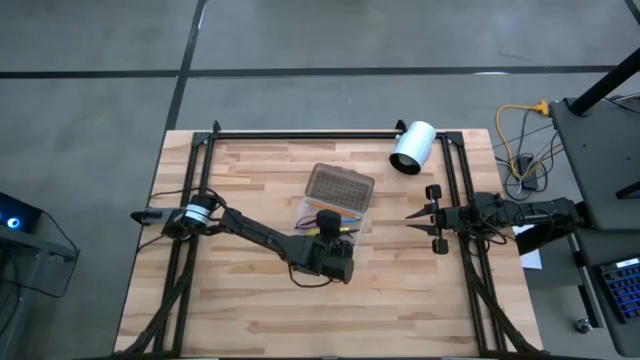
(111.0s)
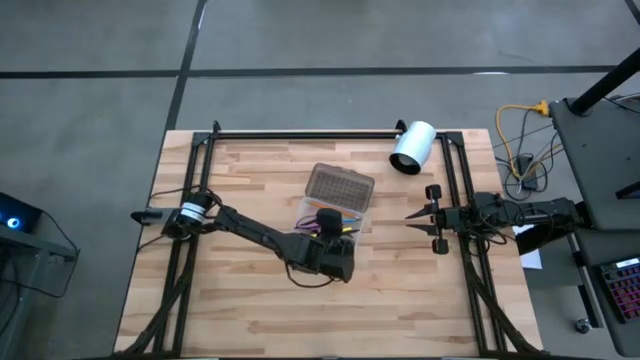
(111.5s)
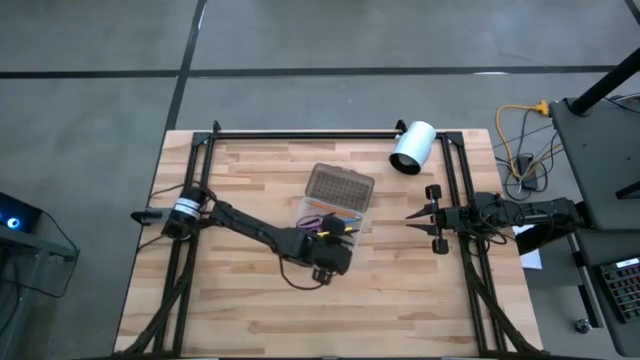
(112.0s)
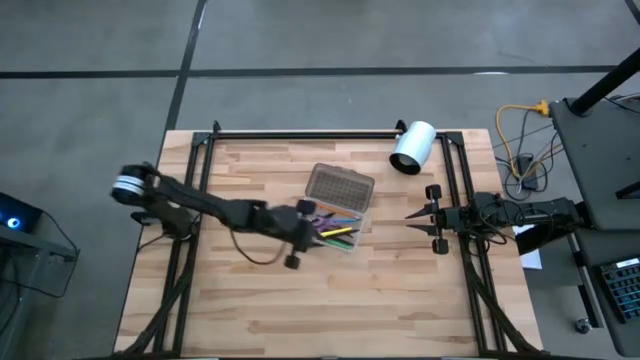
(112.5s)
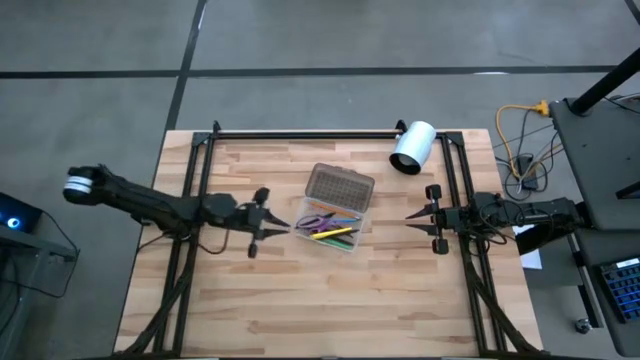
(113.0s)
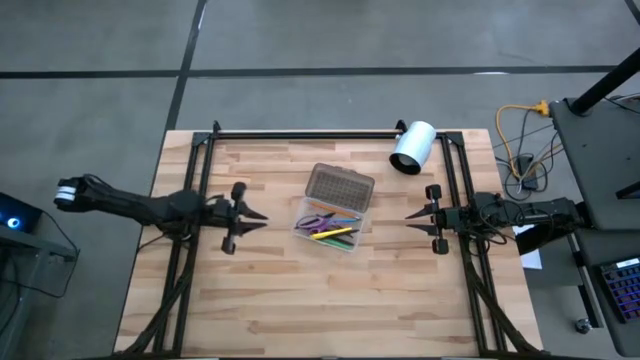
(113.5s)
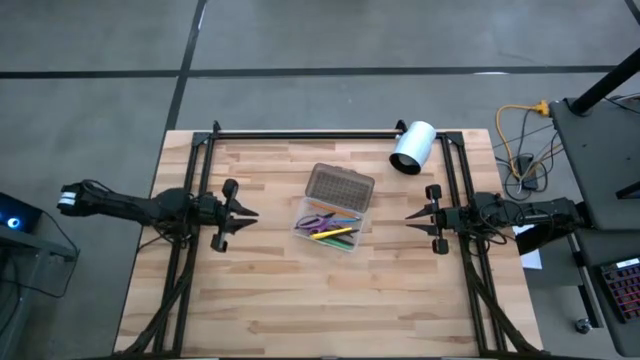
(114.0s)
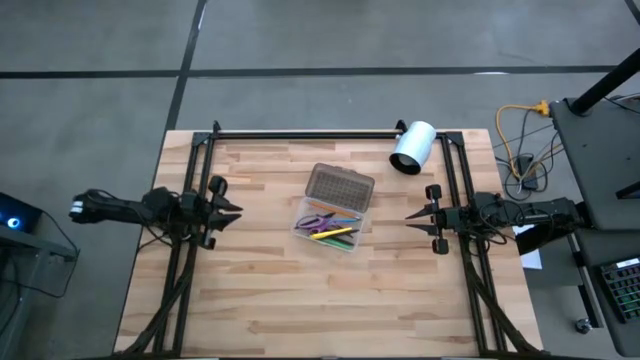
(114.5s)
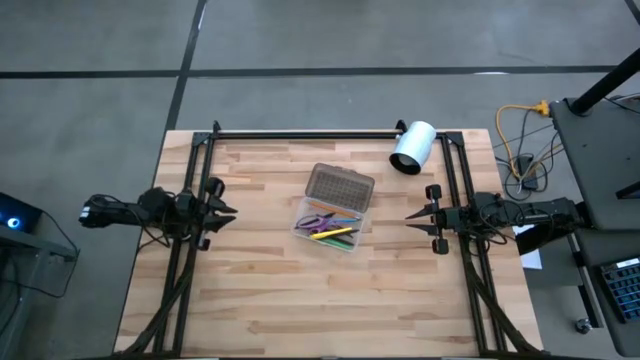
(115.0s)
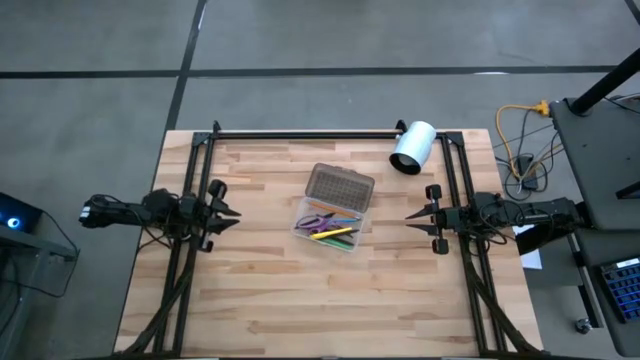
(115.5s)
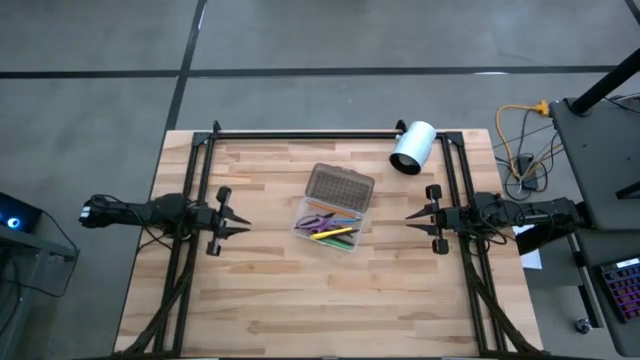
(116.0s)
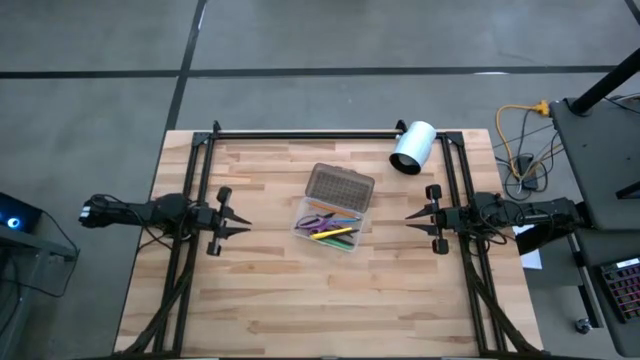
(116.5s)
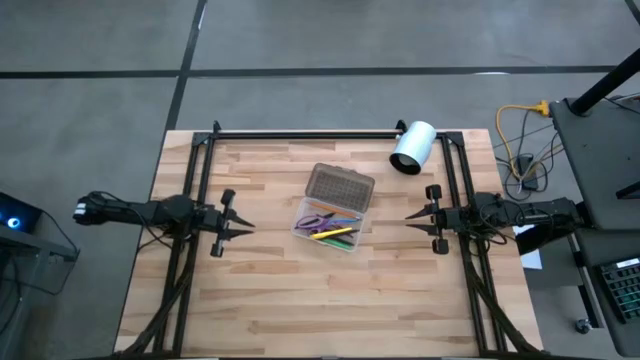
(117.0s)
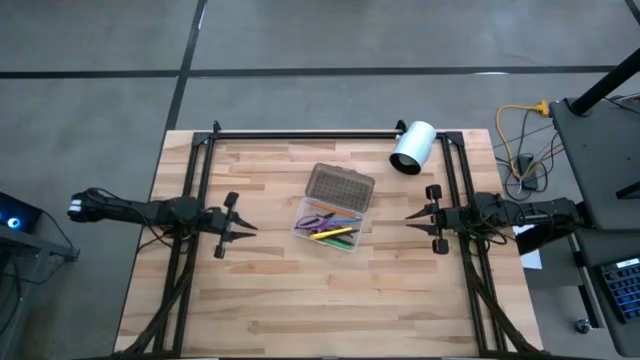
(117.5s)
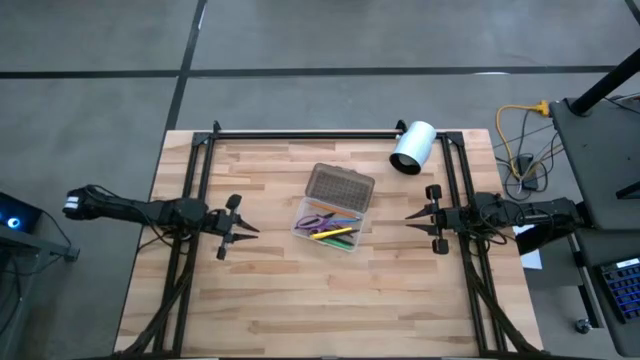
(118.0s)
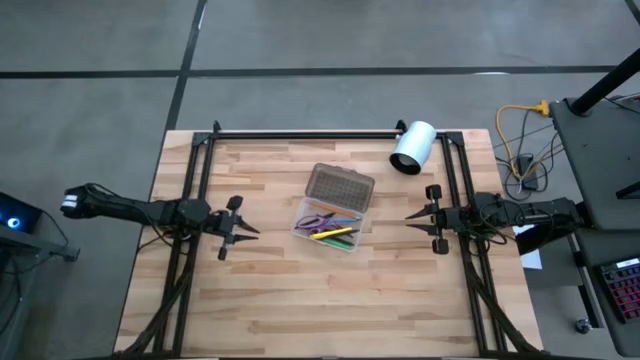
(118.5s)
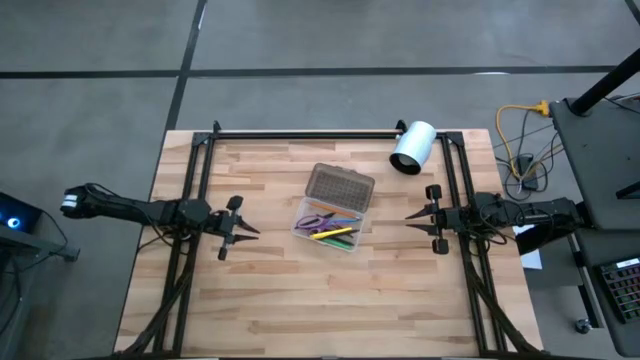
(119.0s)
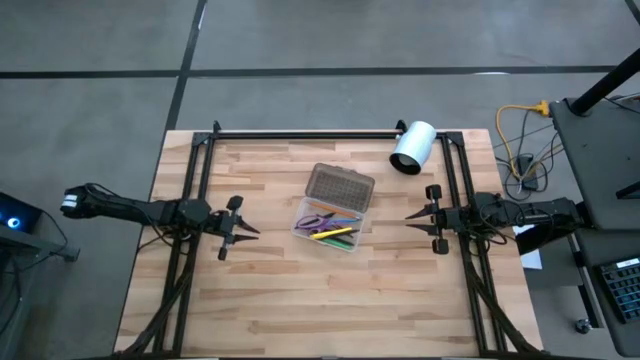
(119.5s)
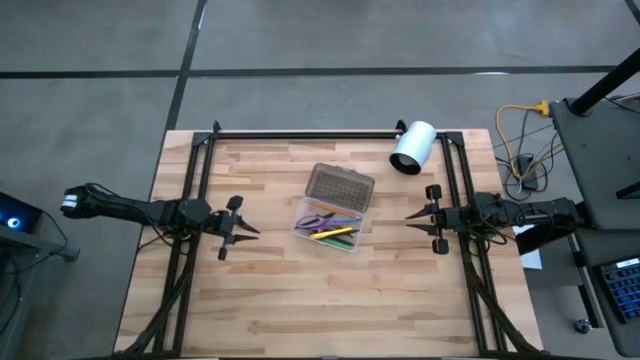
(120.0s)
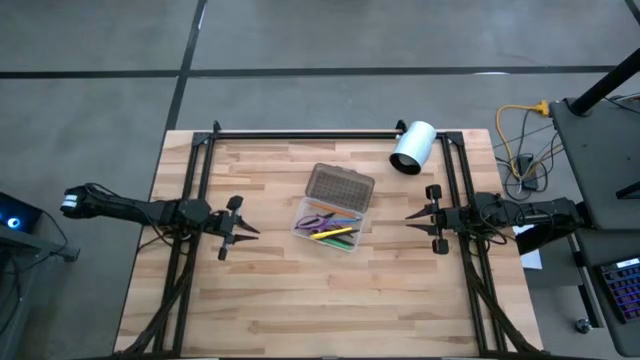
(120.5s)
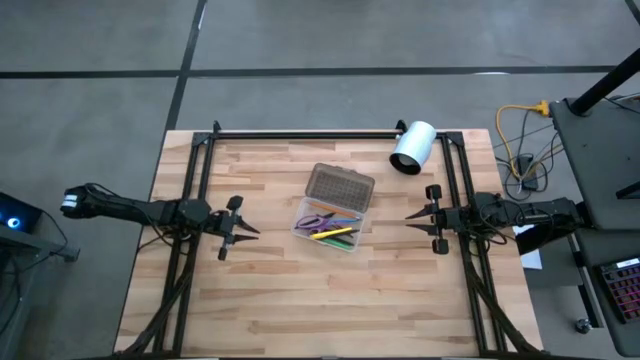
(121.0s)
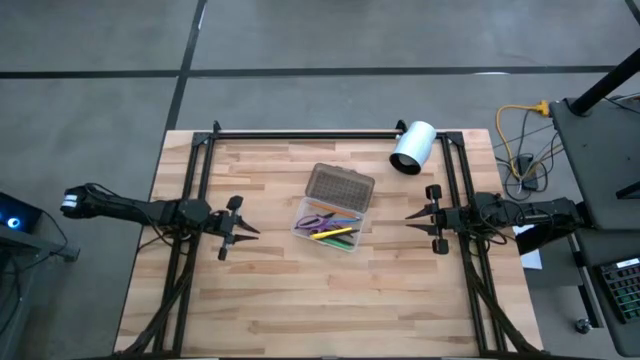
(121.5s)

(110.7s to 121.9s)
Task: Pick & place school supplies into a supply box
Return to Home Position

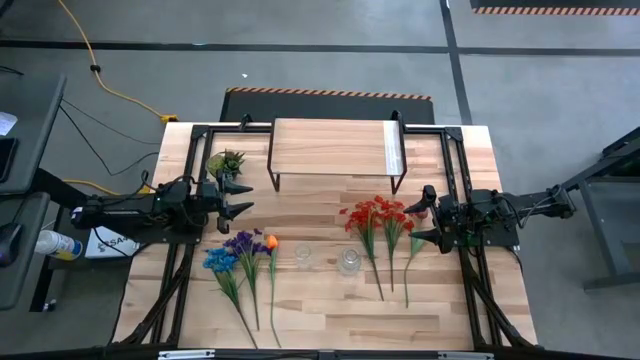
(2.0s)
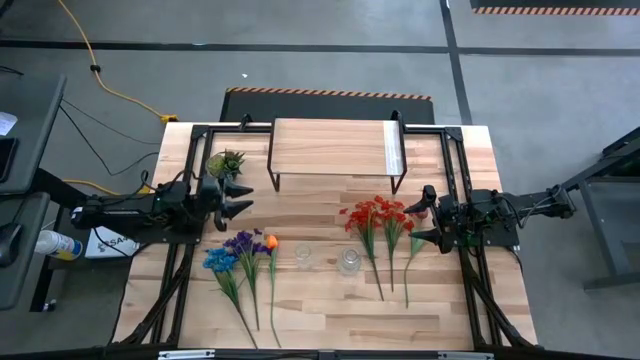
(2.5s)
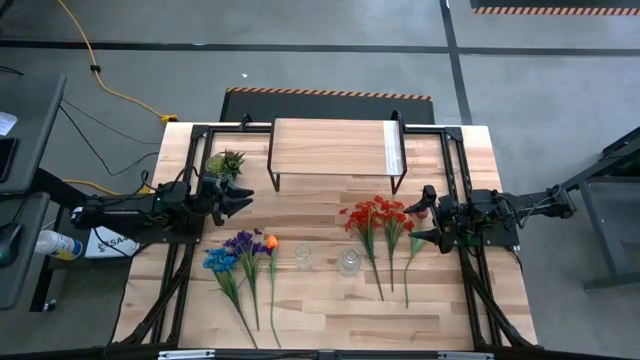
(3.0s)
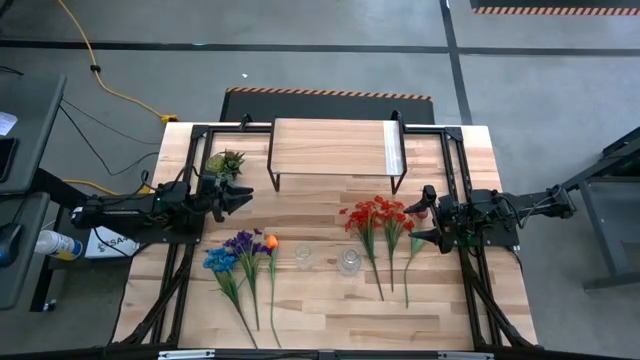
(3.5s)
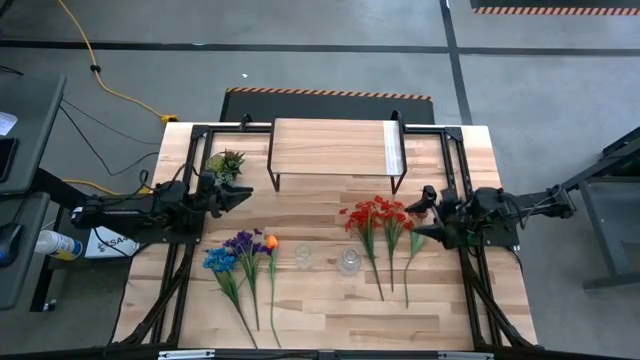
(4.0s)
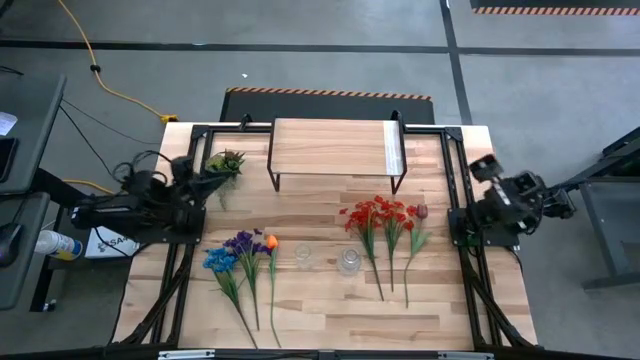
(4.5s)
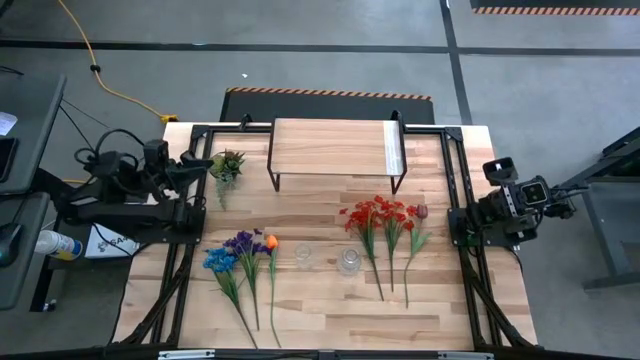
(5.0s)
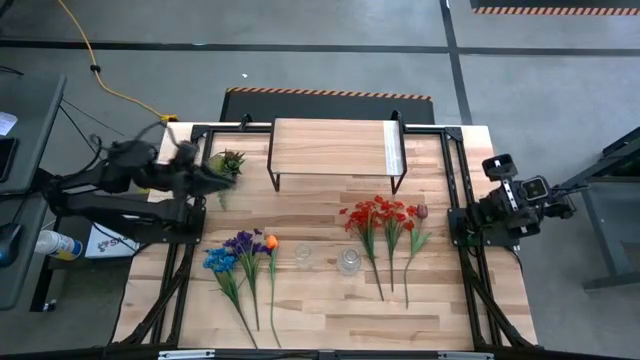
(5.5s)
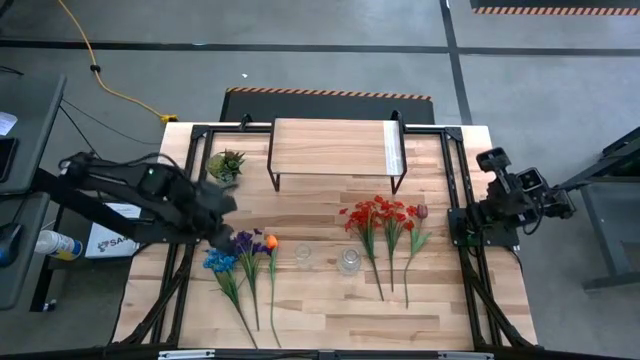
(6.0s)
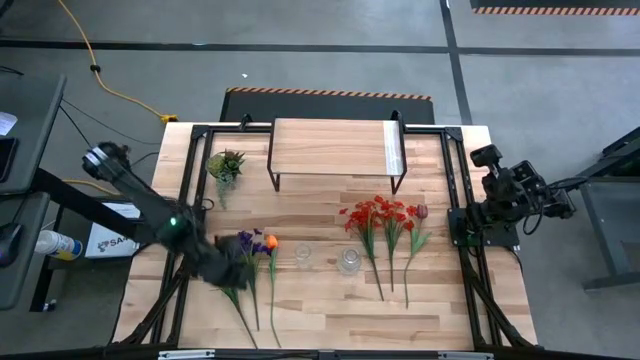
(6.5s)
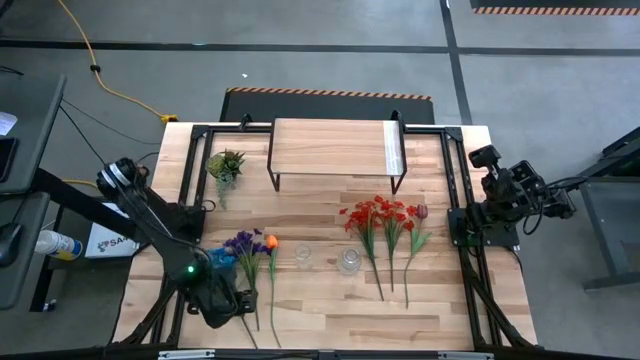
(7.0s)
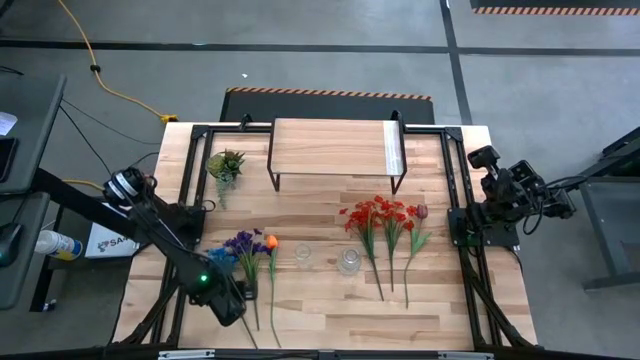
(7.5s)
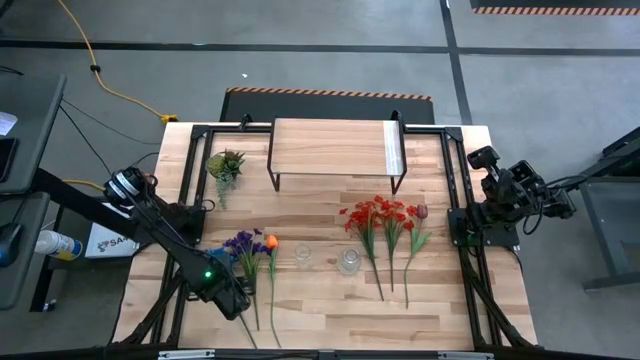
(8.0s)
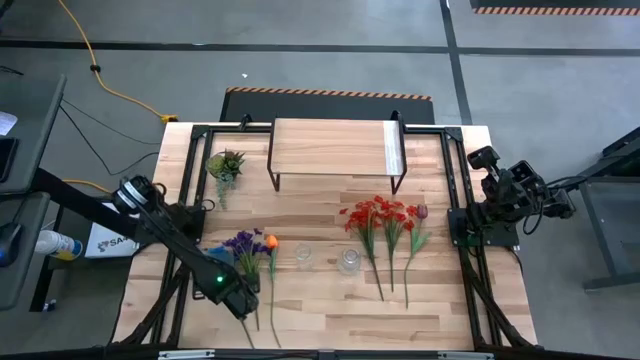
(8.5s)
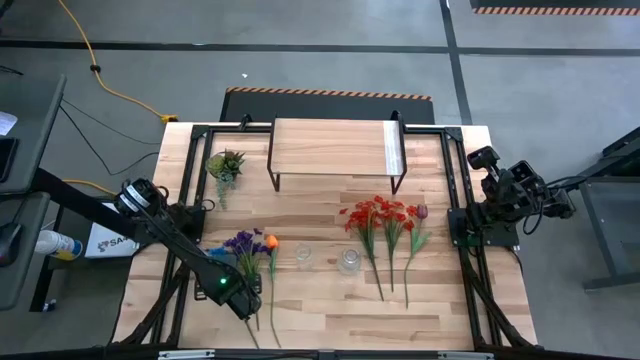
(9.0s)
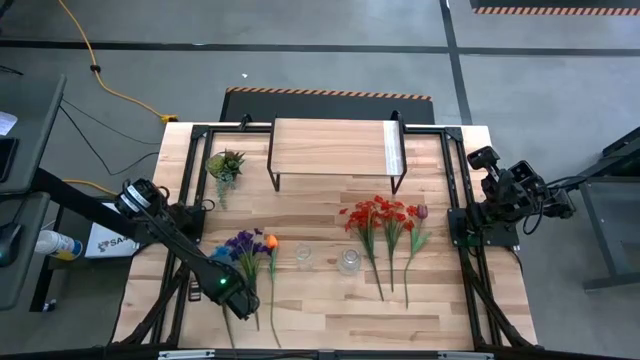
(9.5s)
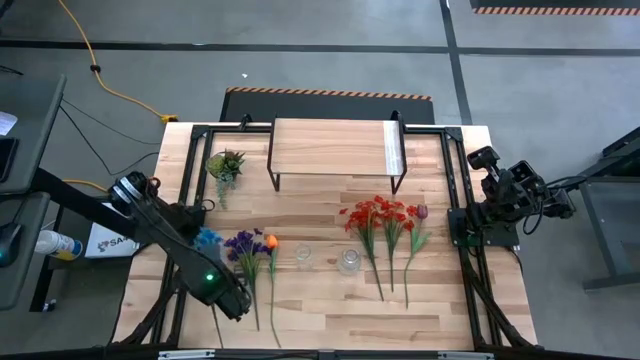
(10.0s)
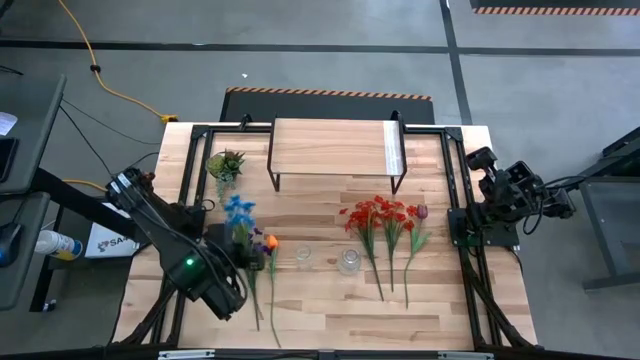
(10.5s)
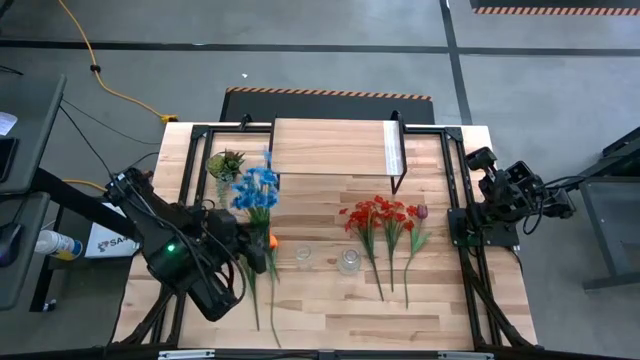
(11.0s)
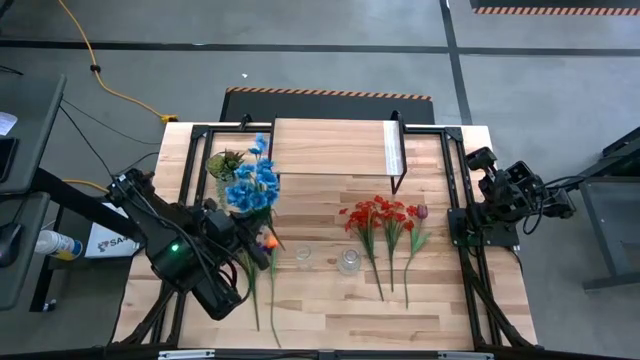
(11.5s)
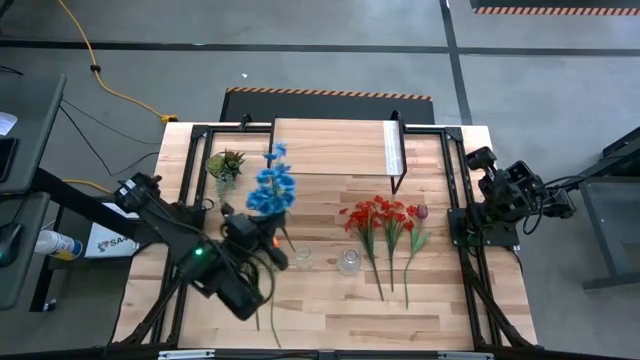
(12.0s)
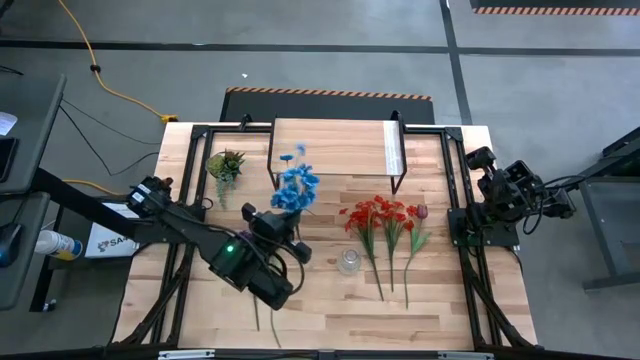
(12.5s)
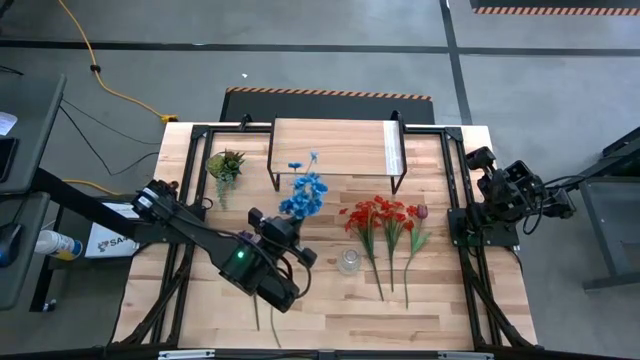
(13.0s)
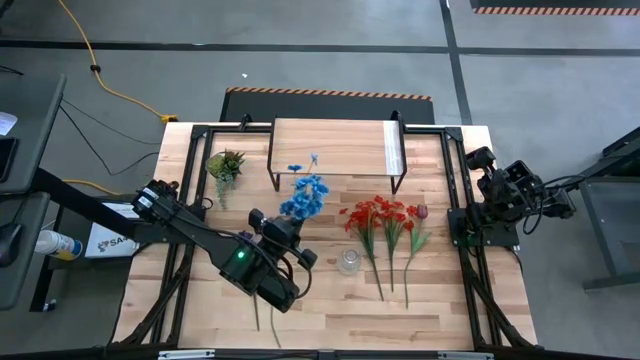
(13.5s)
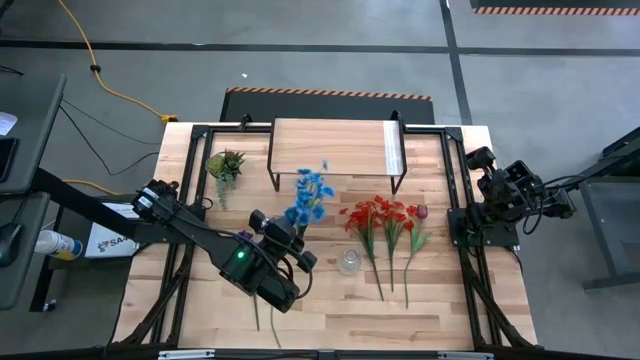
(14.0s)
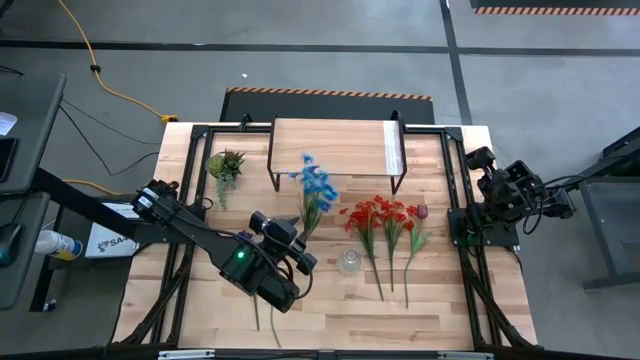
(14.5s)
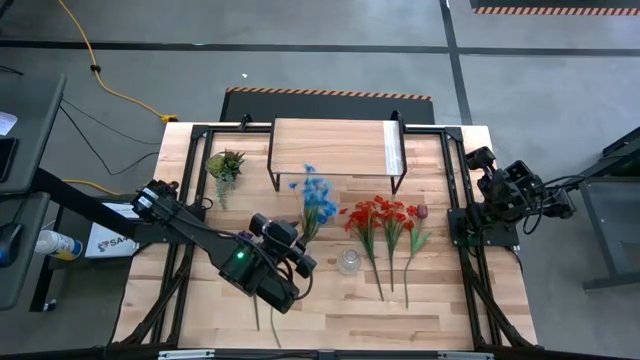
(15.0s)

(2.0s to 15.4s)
Task: Pick and place flowers into a vace then onto a shelf
Put the blue flowers into the left transparent flower vase
